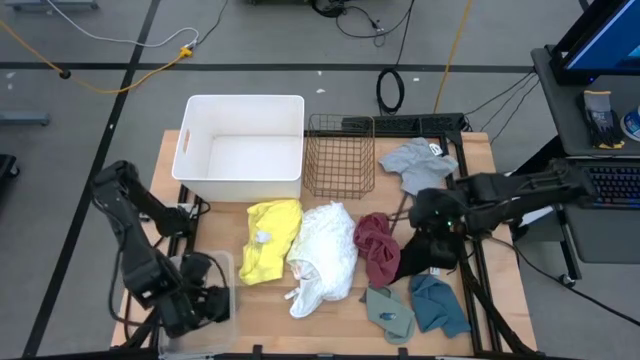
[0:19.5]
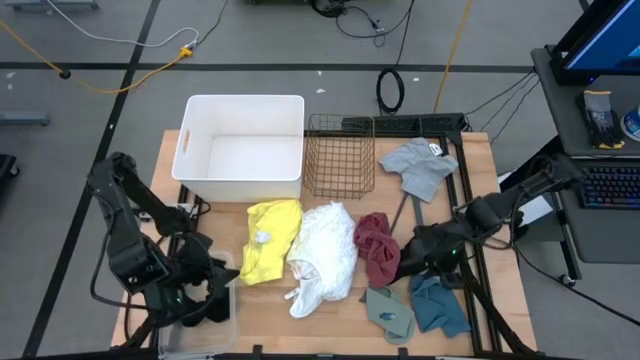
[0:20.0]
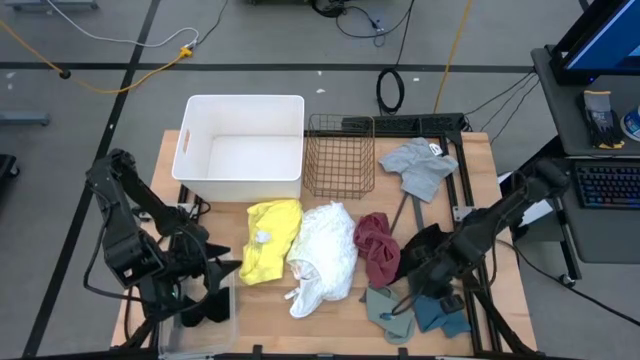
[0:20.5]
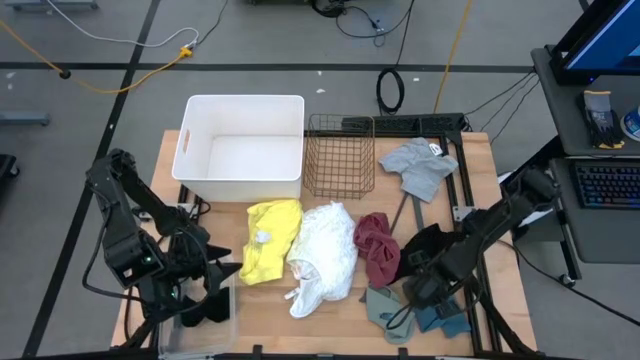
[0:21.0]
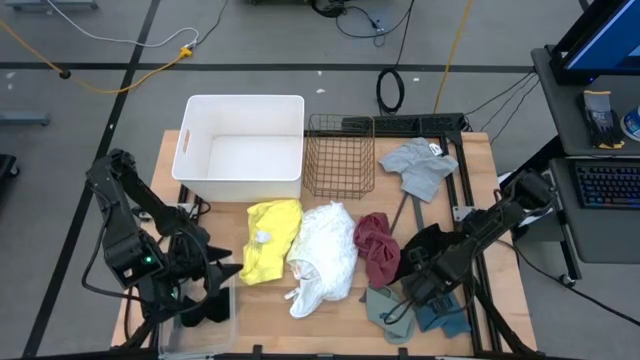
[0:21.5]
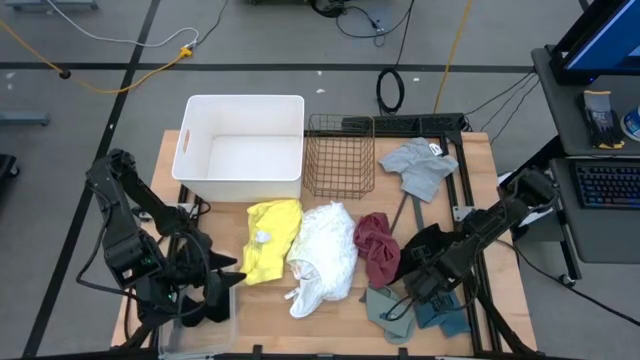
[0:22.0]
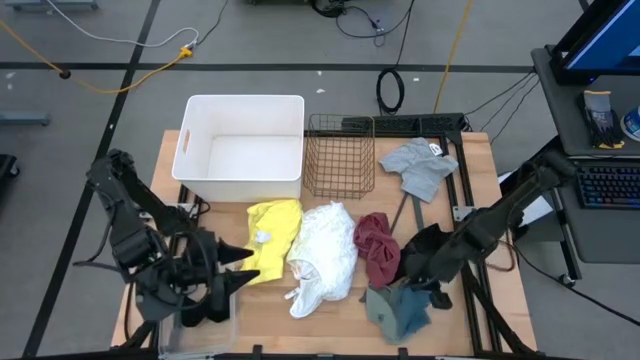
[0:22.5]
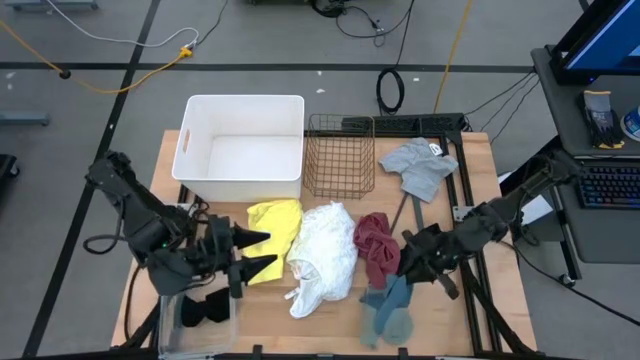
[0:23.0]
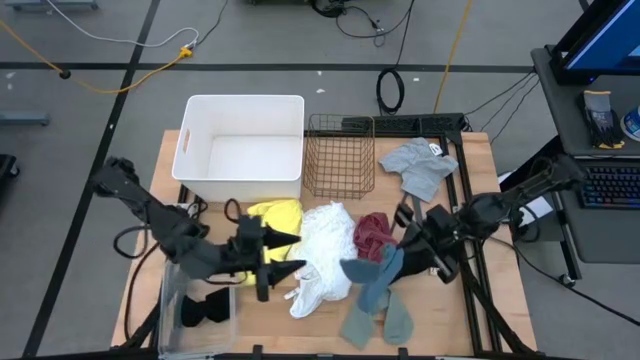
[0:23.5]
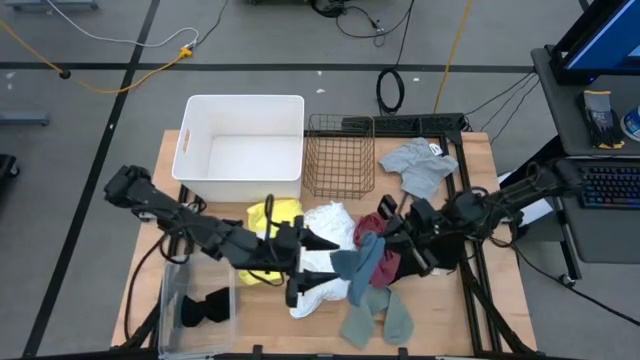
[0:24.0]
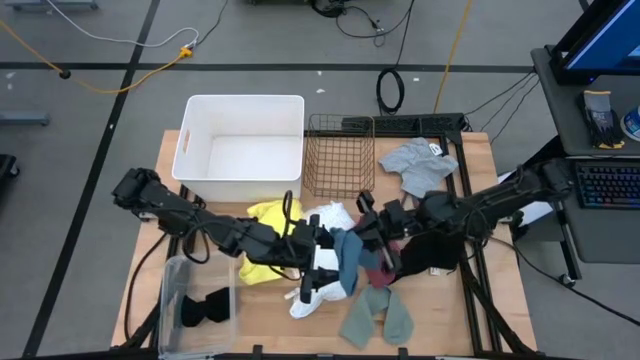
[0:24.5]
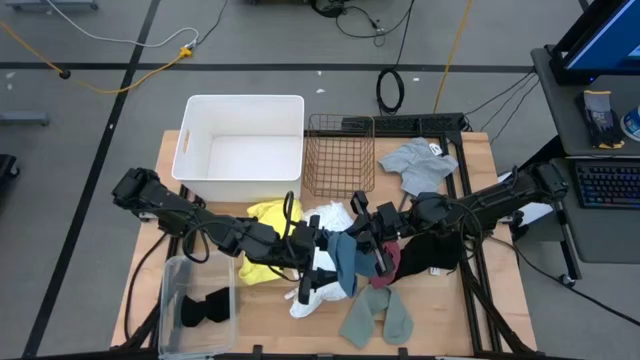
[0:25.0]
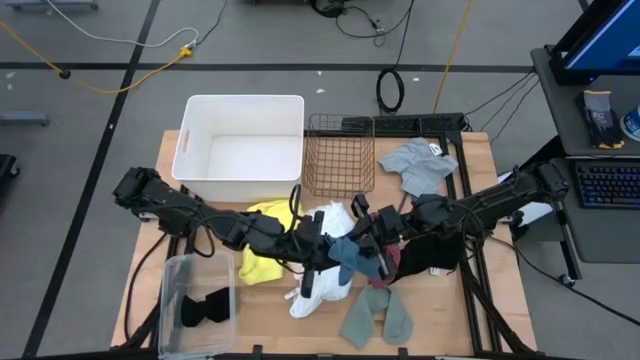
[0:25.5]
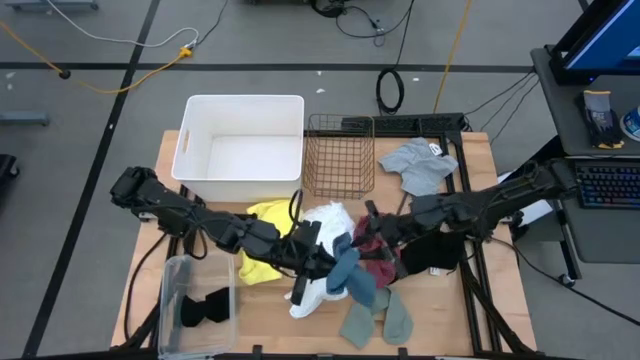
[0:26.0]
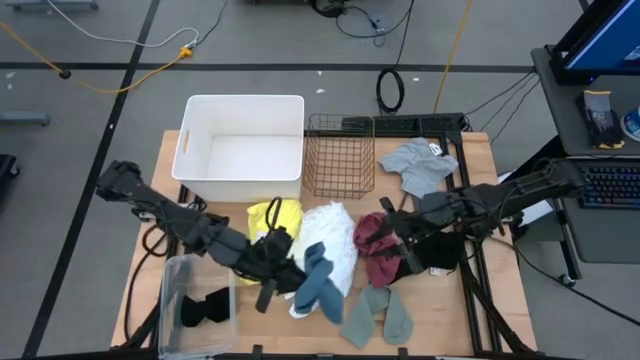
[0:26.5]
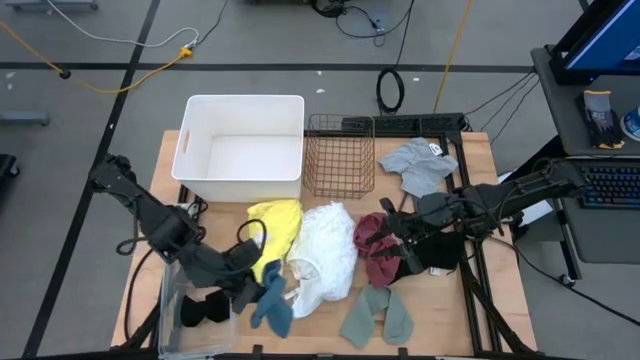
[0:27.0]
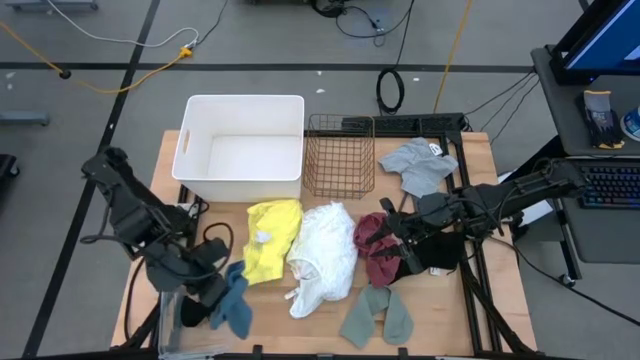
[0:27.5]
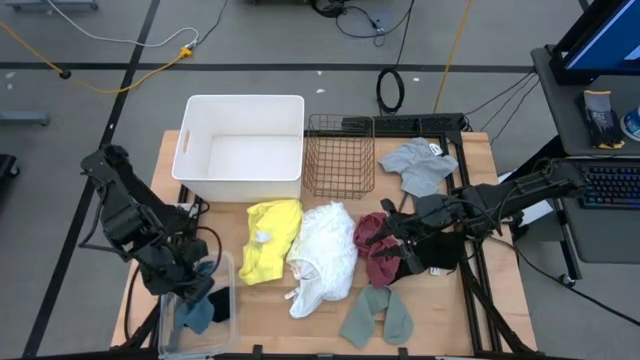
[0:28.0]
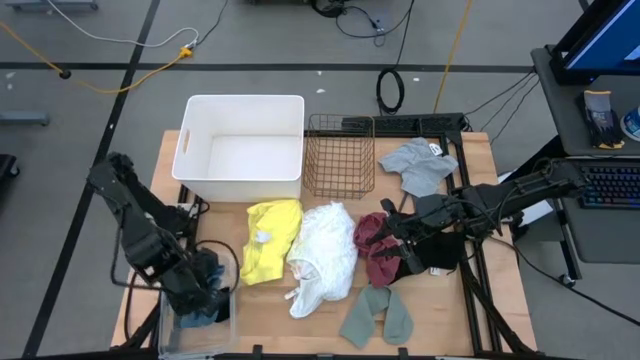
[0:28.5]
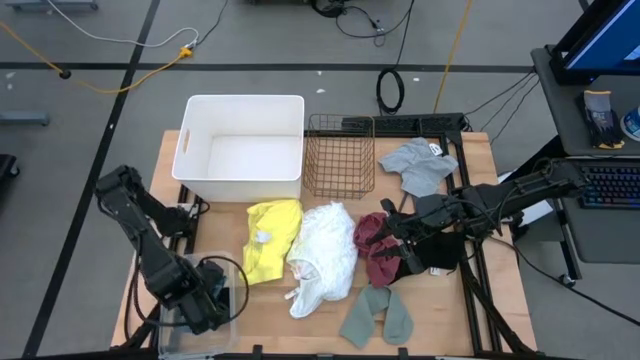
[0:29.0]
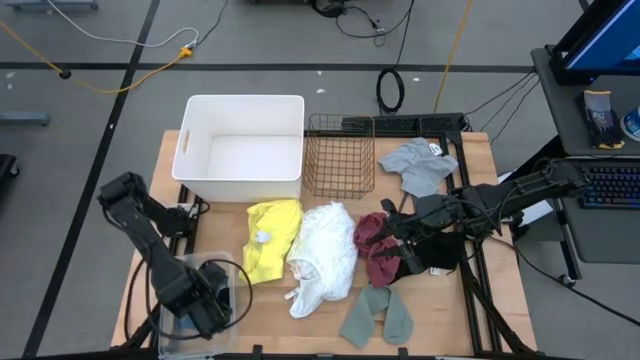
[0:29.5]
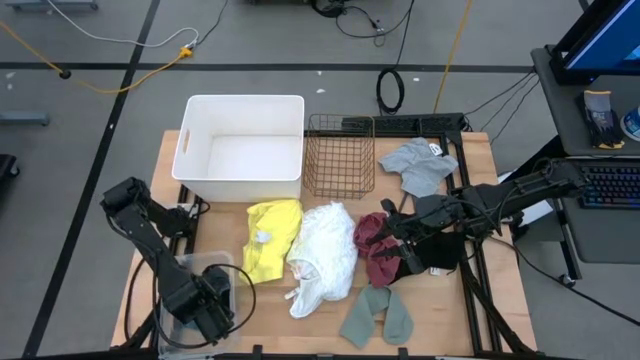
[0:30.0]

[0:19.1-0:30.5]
Task: Pick & Place Cloths
Put the teal sock into the transparent bin

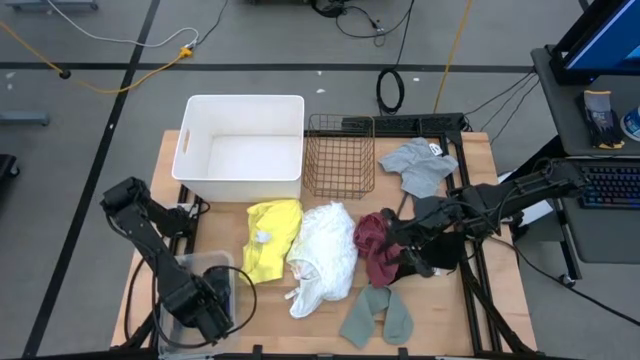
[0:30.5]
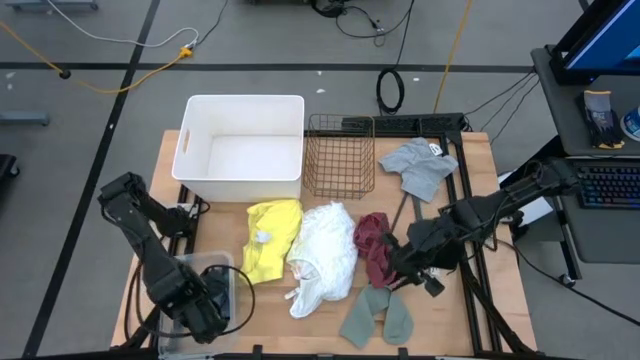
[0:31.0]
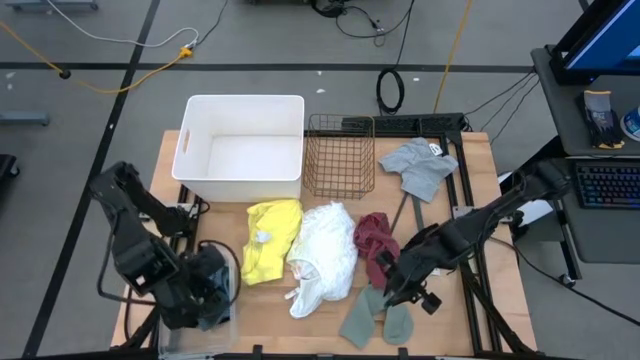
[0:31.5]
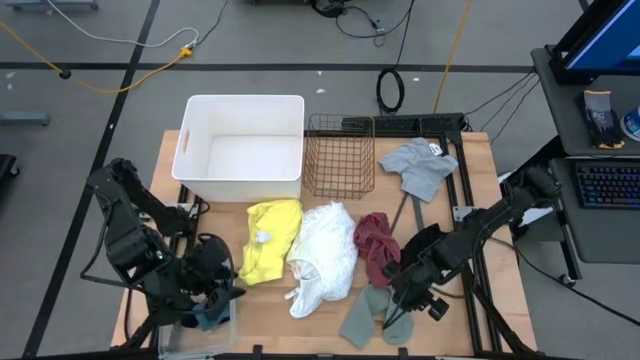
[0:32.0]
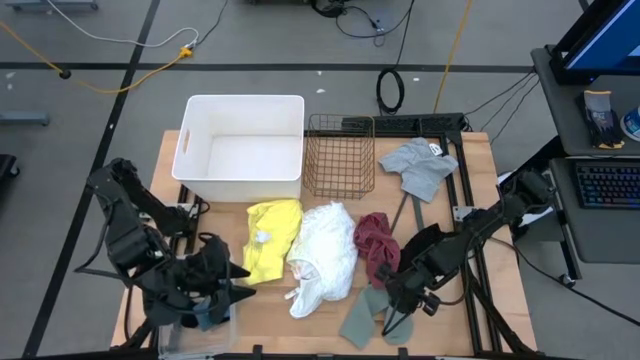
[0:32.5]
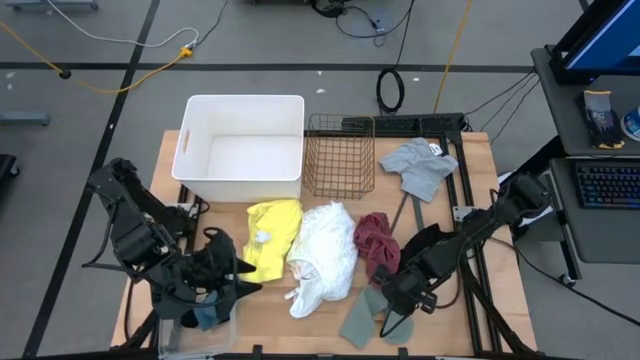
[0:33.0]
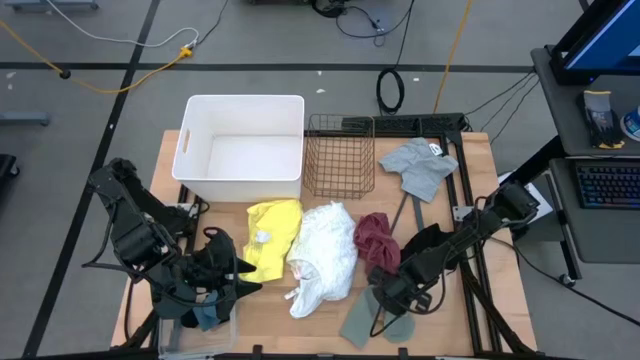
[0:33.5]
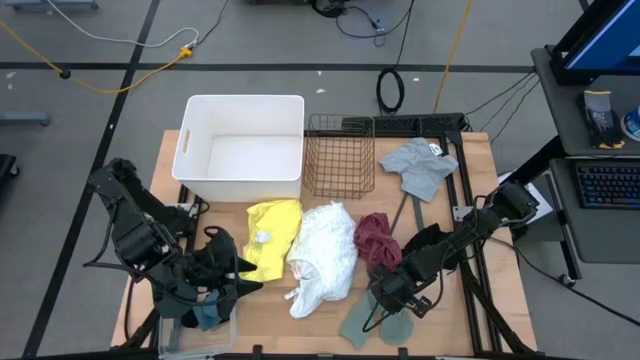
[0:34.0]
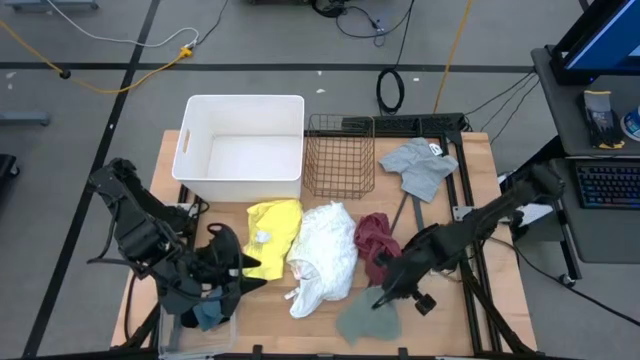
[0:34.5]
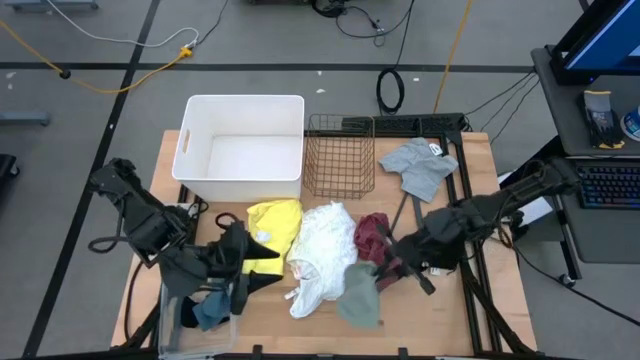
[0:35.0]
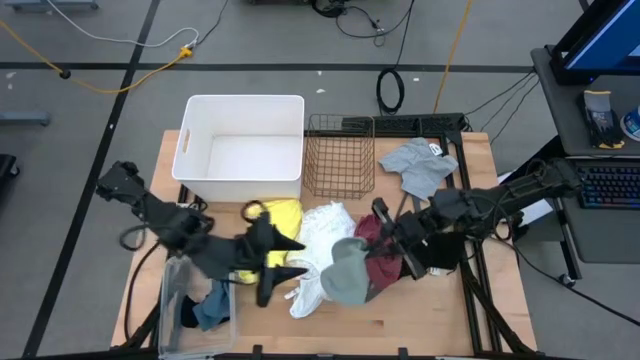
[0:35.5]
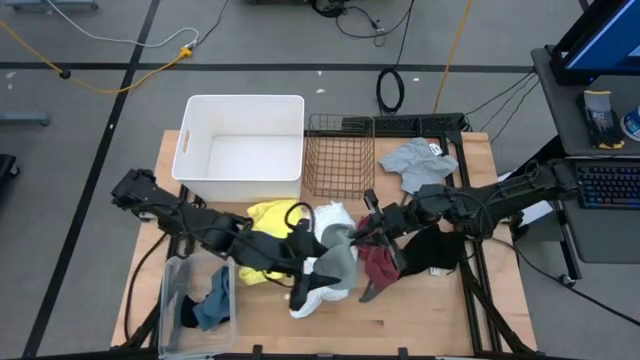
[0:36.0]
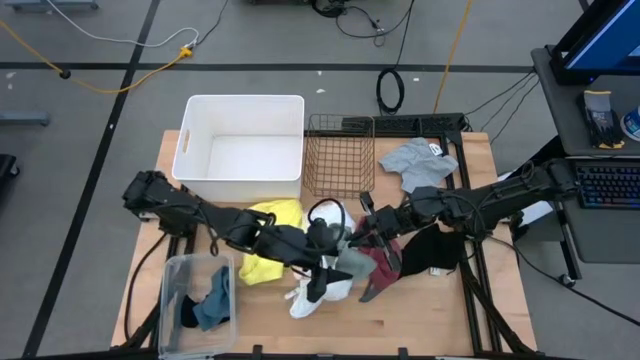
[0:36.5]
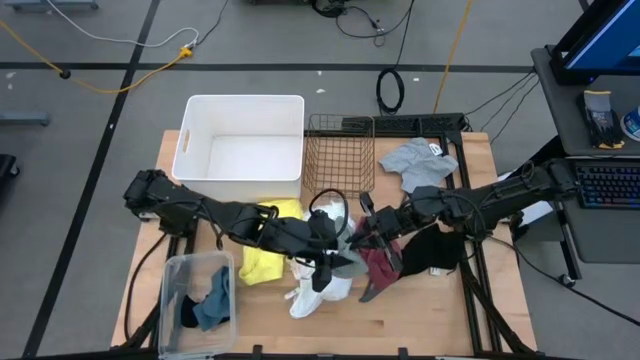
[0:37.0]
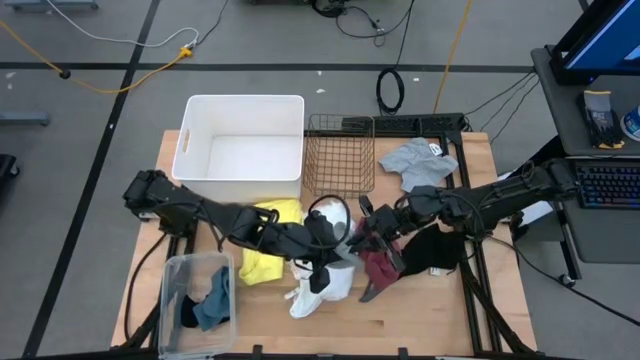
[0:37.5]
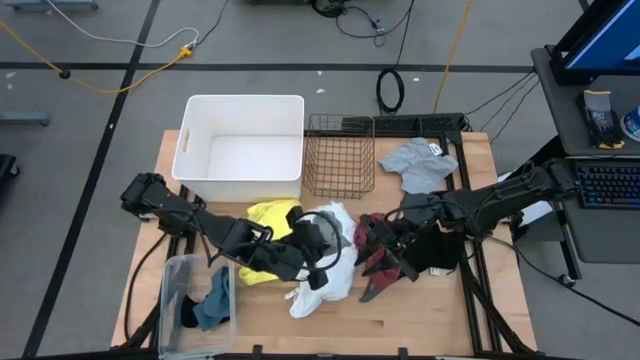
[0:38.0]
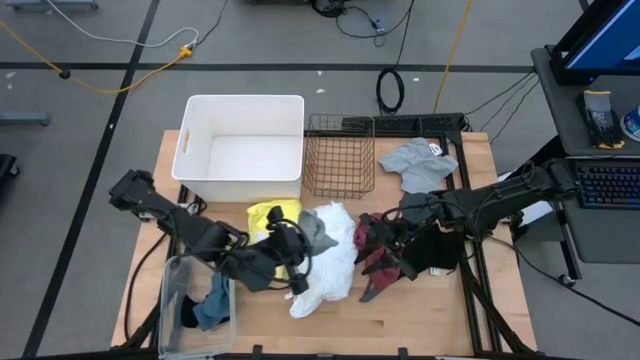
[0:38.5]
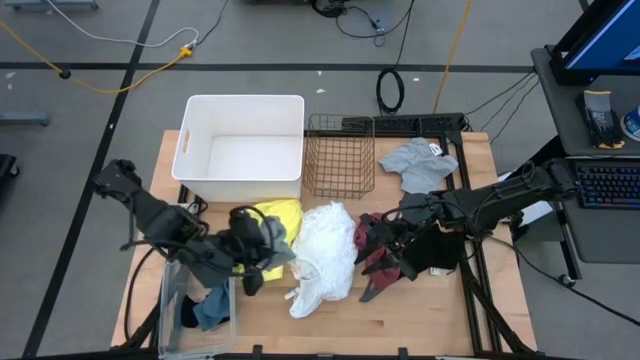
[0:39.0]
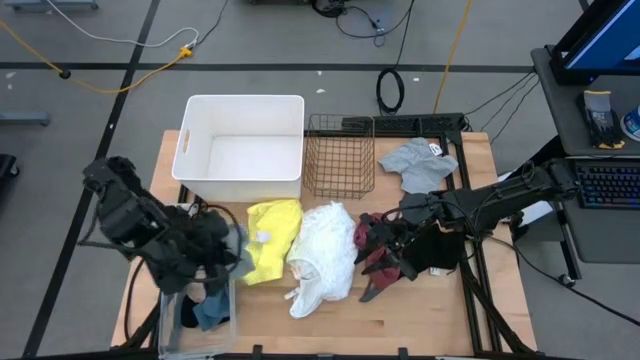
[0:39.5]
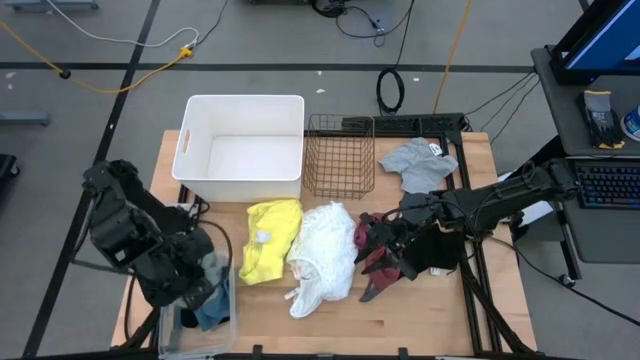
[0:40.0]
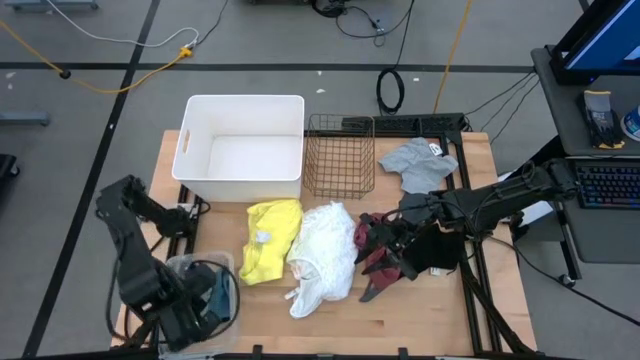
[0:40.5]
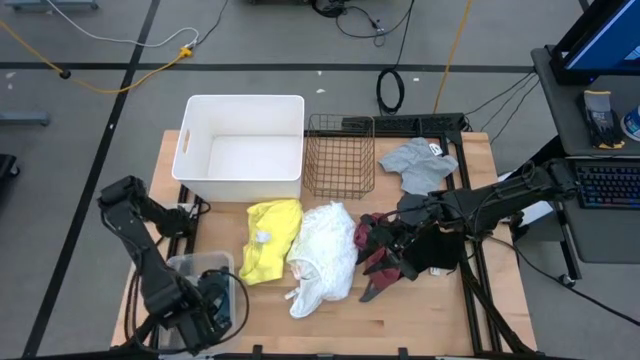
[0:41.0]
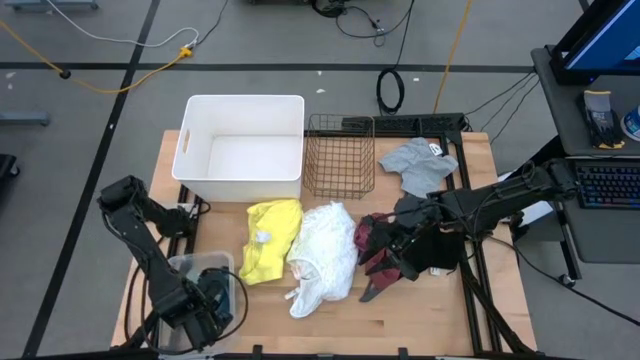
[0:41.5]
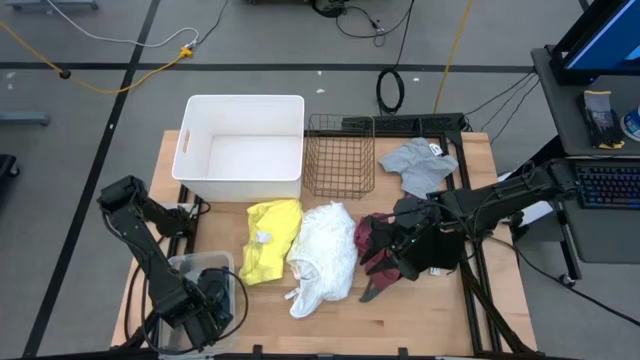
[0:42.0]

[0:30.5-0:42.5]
Put the gray sock into the transparent bin
